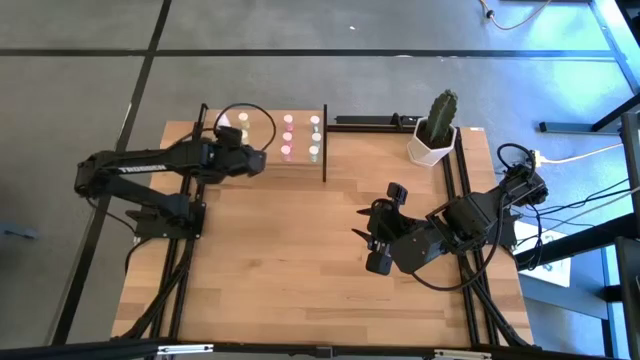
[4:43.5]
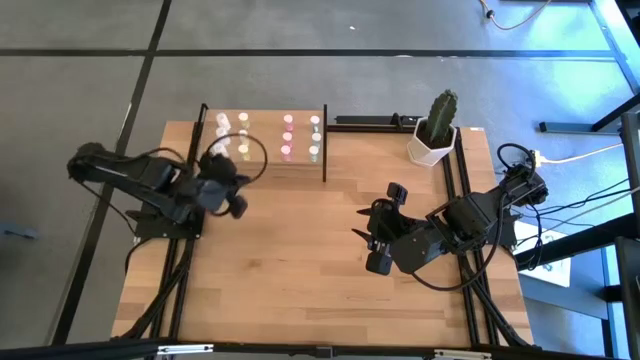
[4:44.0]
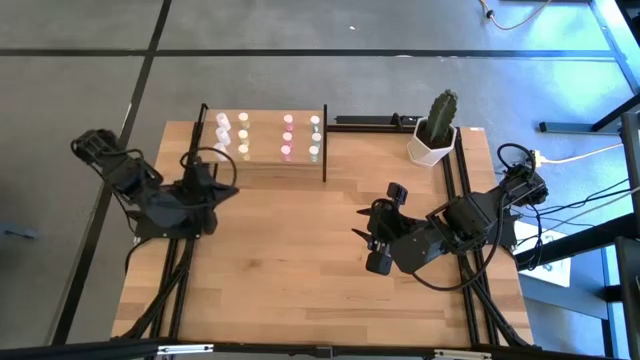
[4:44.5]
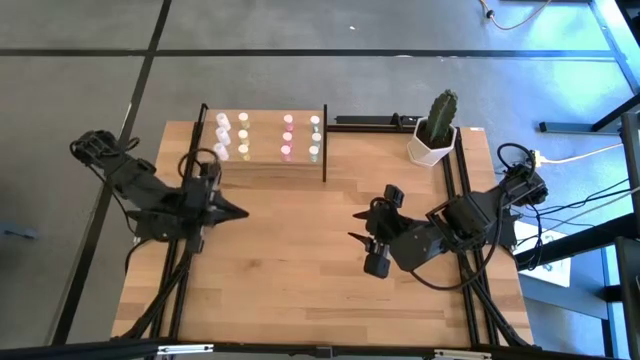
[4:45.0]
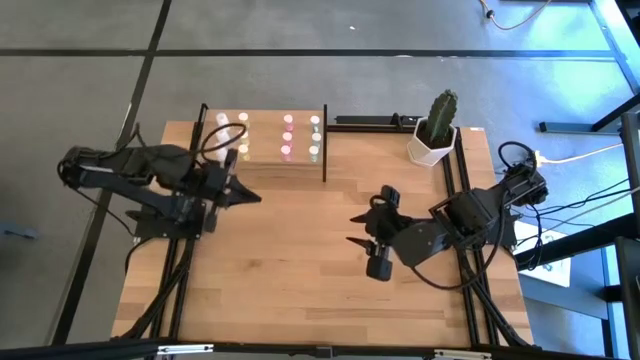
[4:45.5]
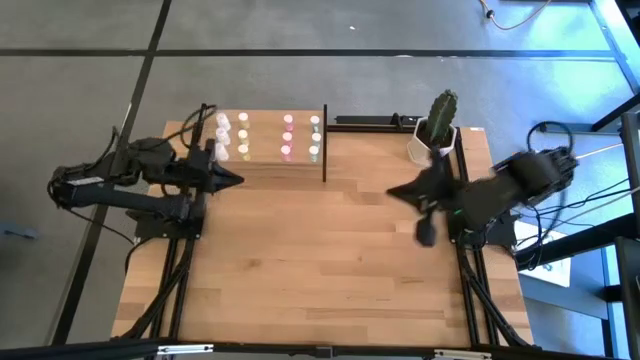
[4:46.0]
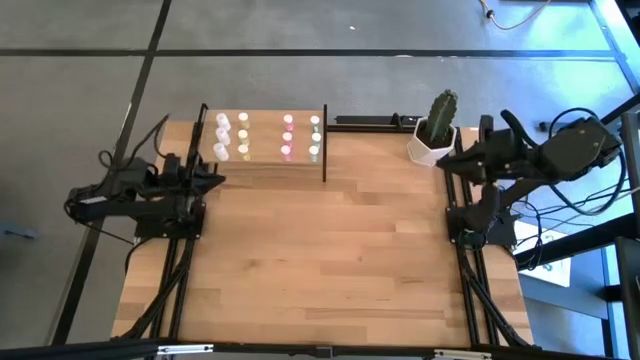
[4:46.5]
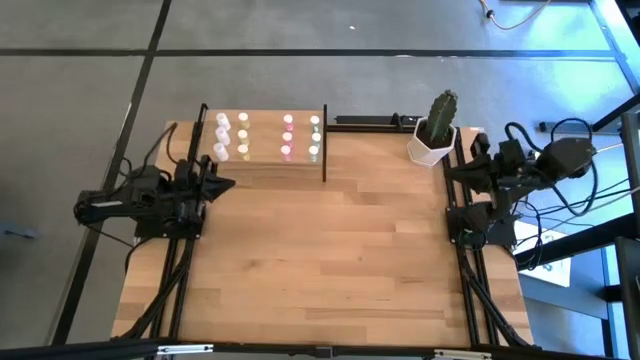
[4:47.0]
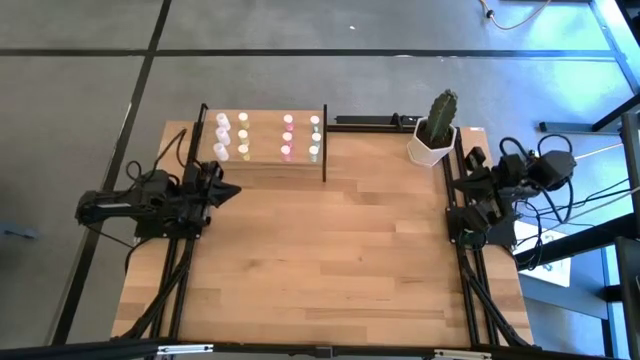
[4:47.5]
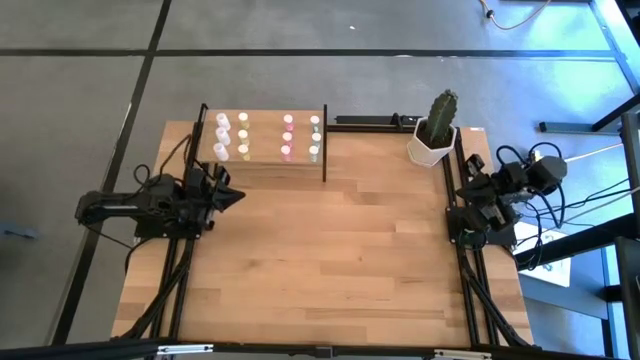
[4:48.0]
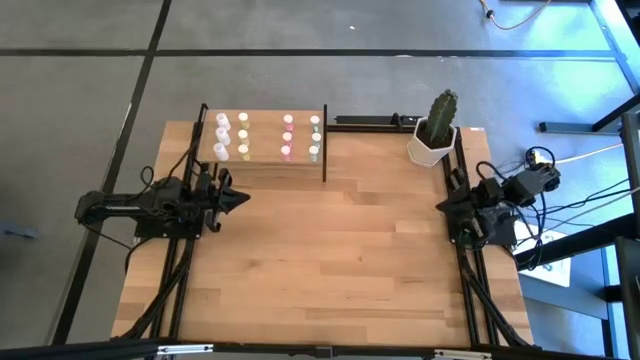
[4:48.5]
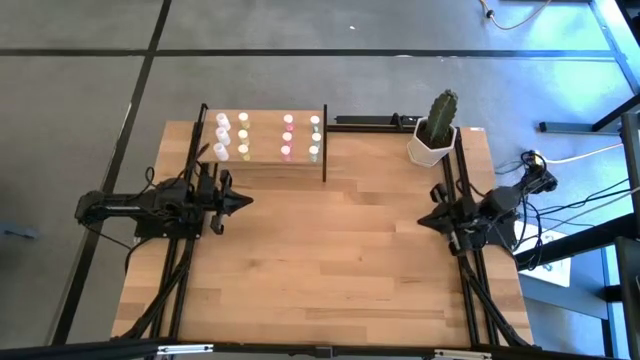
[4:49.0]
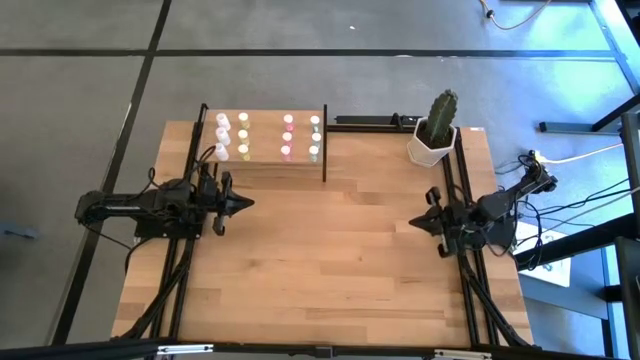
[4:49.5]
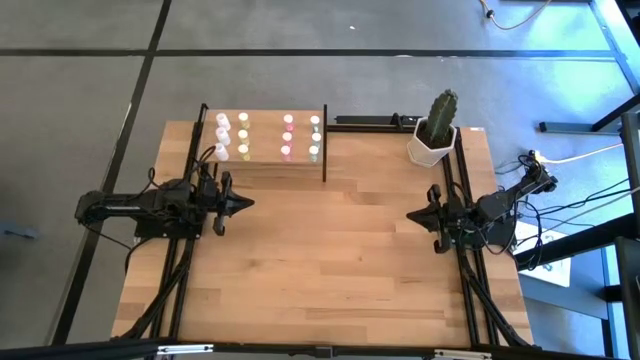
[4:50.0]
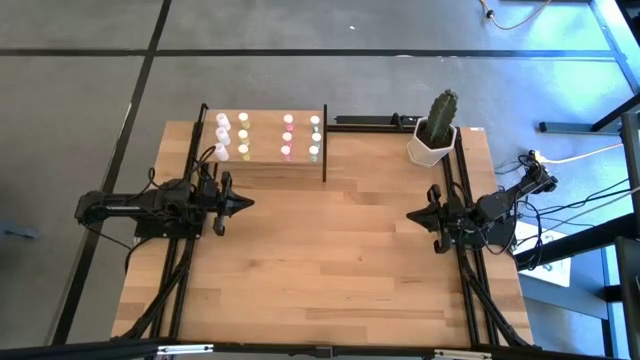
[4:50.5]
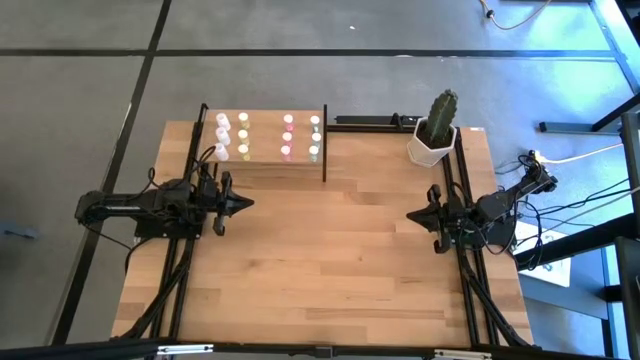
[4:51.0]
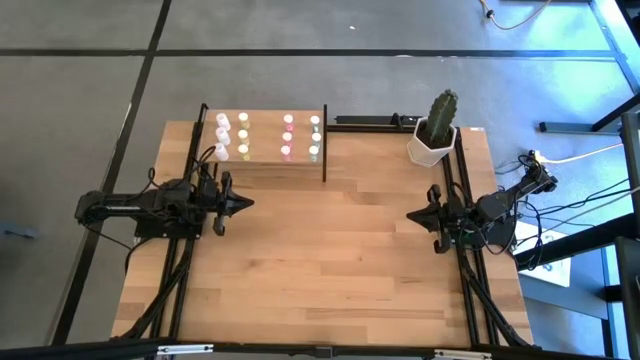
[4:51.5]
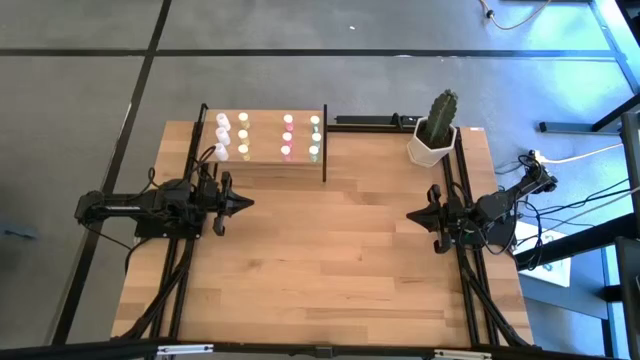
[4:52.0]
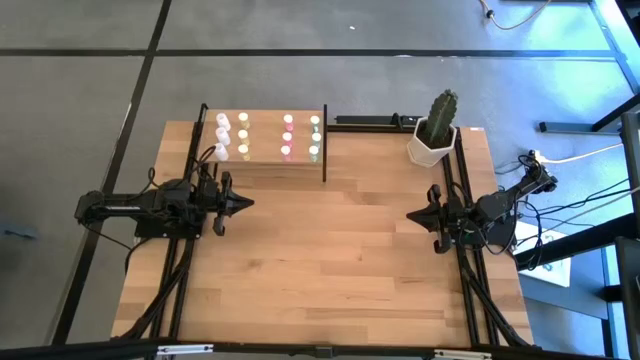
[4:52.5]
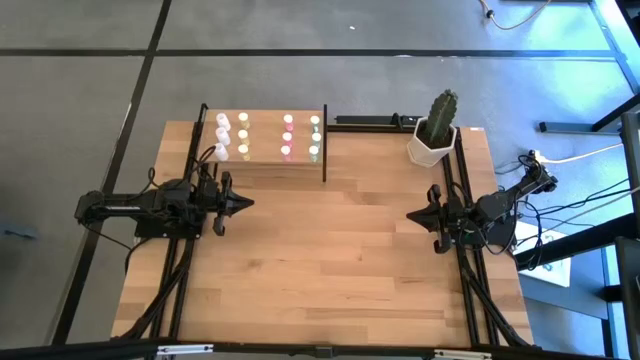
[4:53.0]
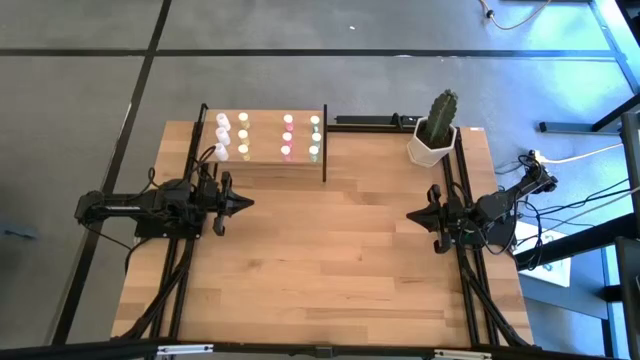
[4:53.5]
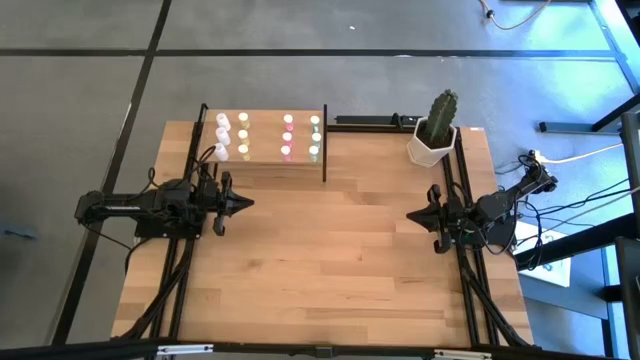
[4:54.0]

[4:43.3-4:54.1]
Task: Pick and place medicine bottles onto shelf by color
Return to Home Position

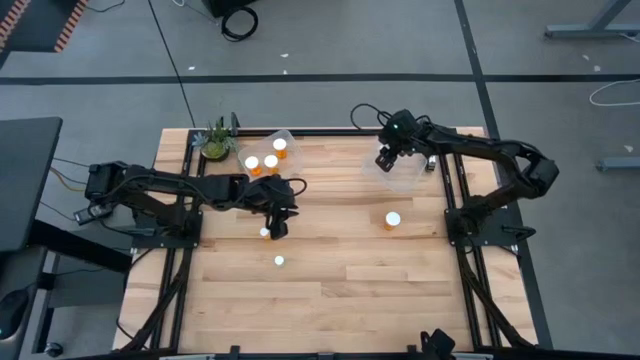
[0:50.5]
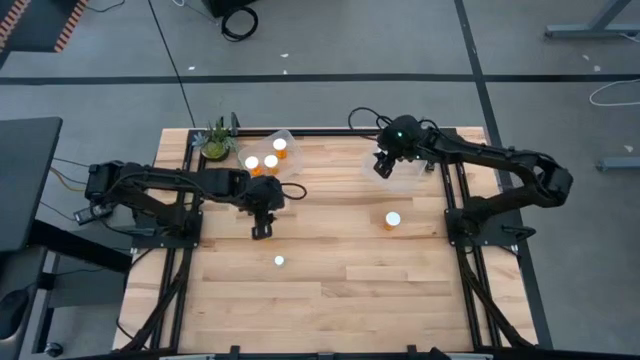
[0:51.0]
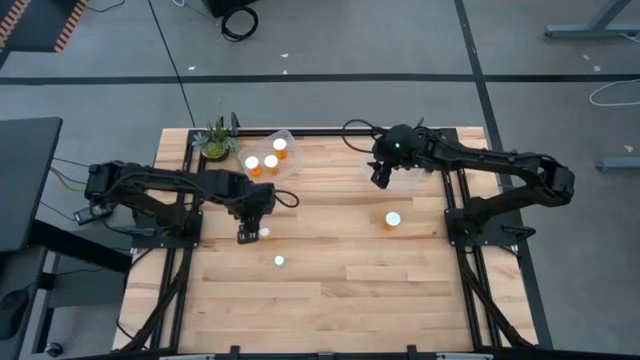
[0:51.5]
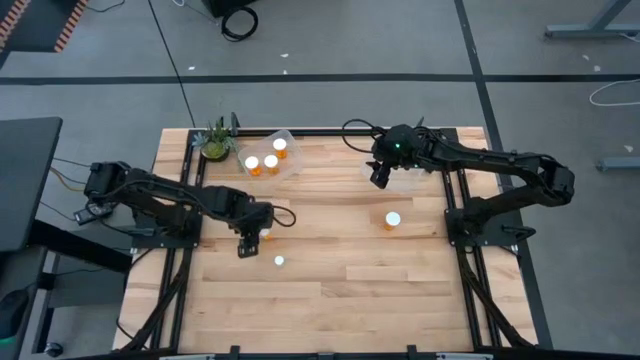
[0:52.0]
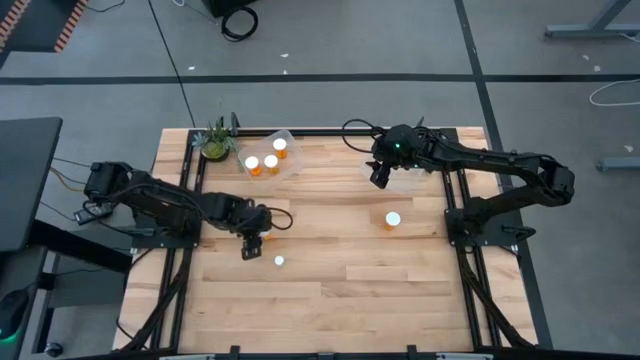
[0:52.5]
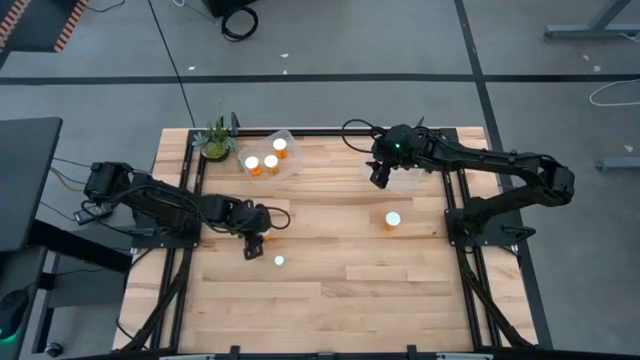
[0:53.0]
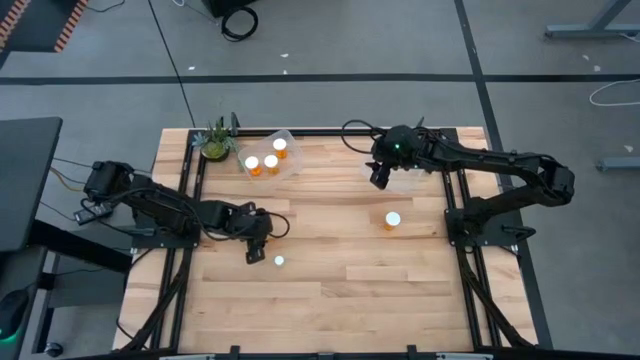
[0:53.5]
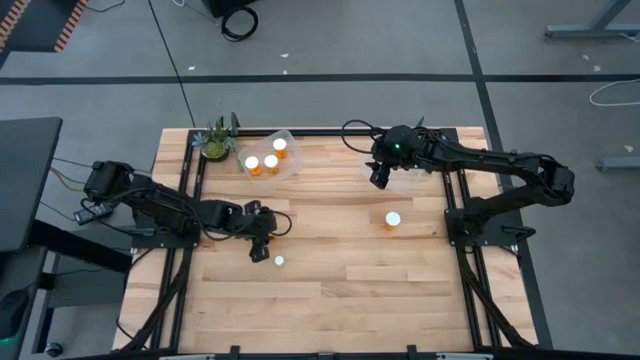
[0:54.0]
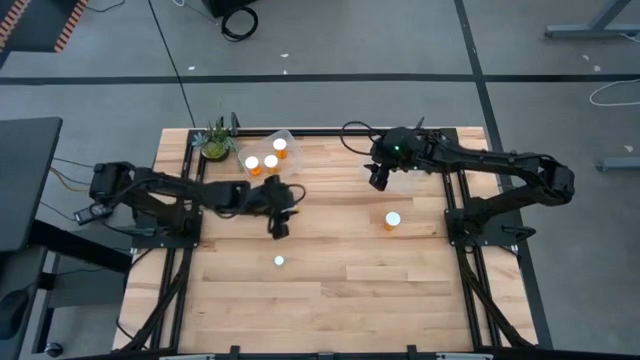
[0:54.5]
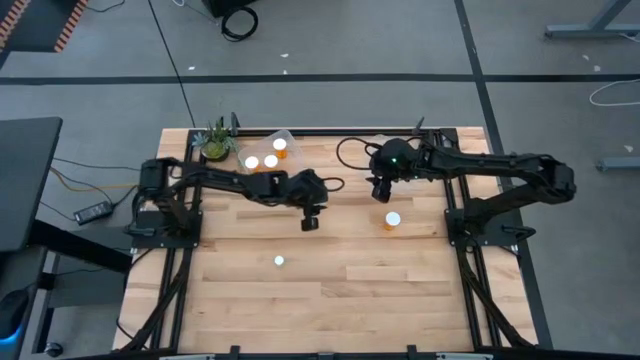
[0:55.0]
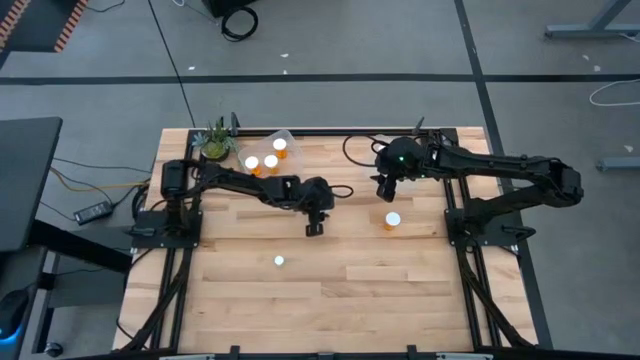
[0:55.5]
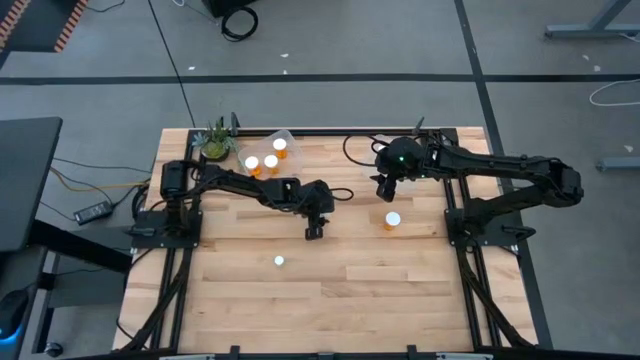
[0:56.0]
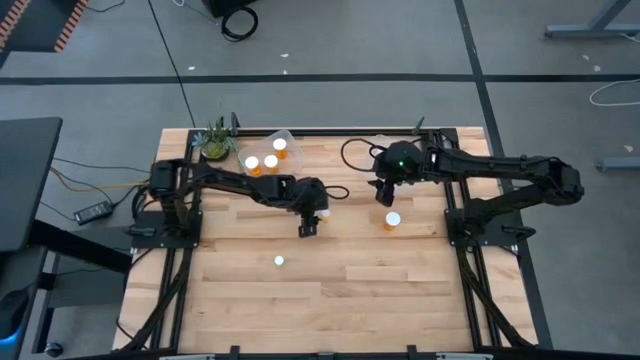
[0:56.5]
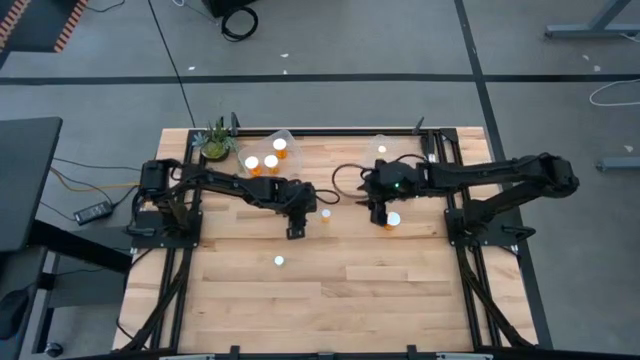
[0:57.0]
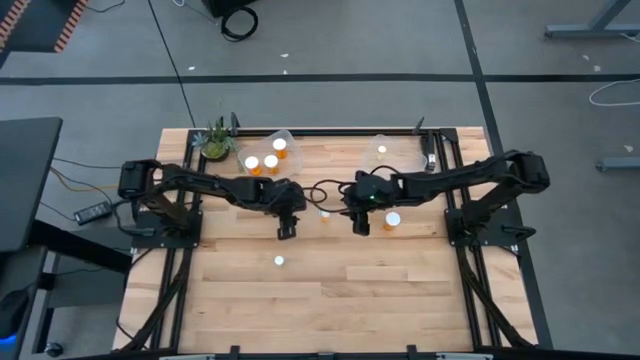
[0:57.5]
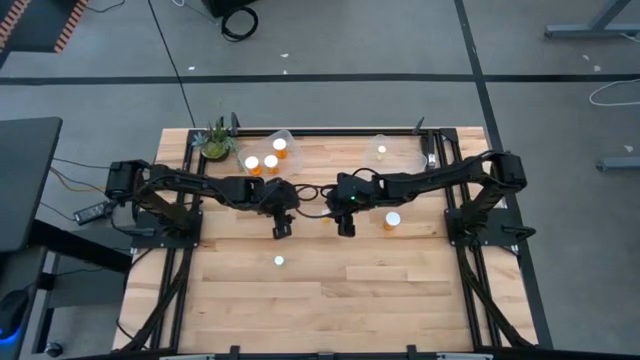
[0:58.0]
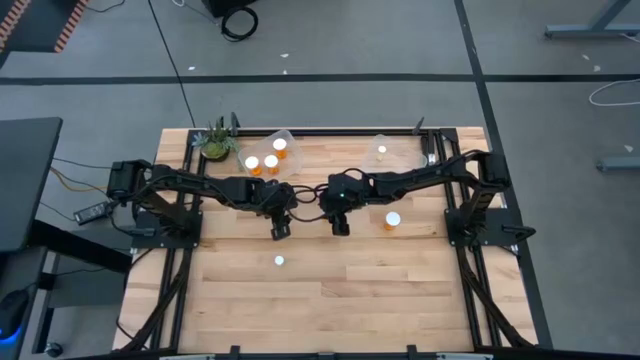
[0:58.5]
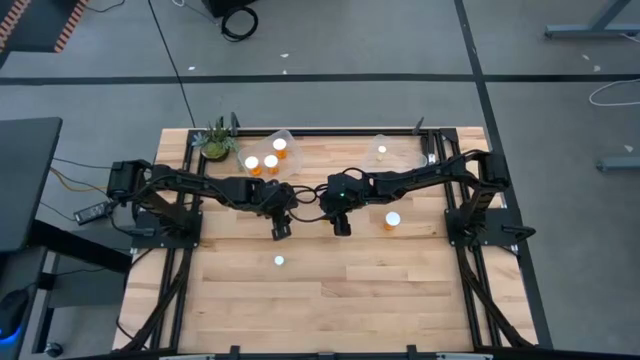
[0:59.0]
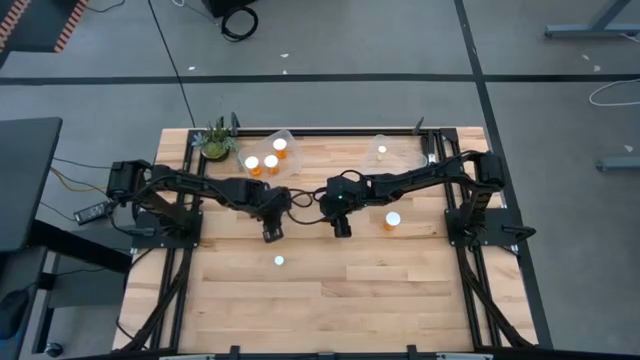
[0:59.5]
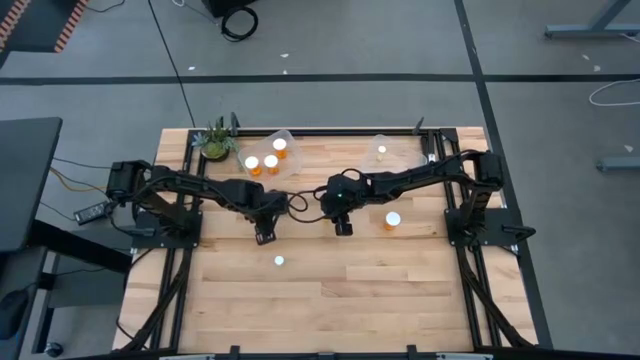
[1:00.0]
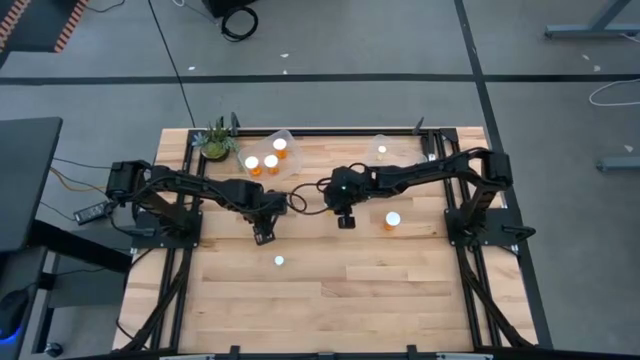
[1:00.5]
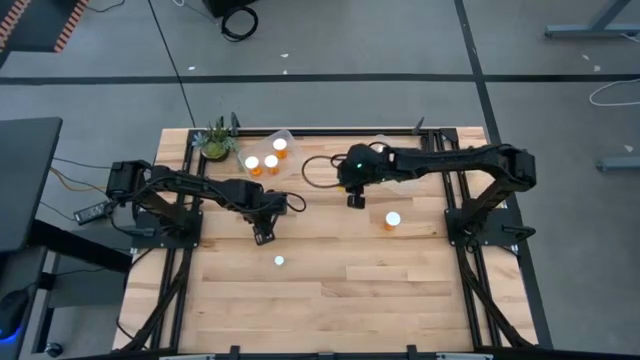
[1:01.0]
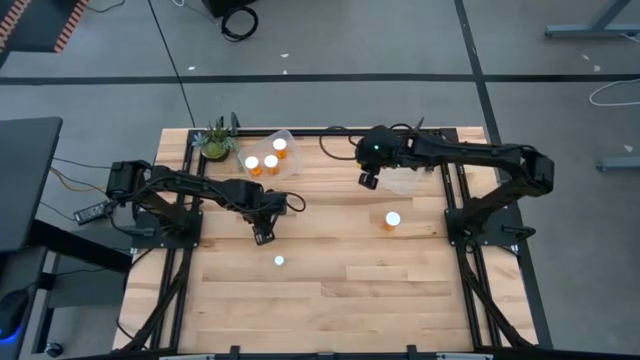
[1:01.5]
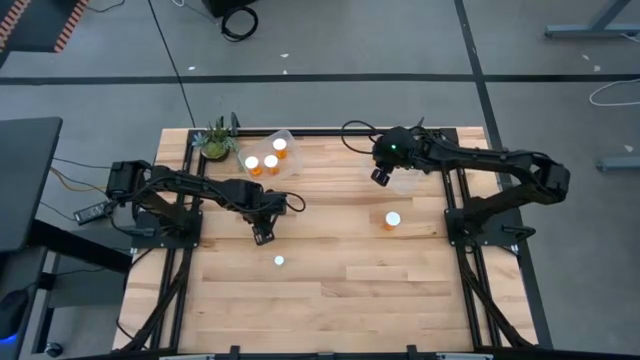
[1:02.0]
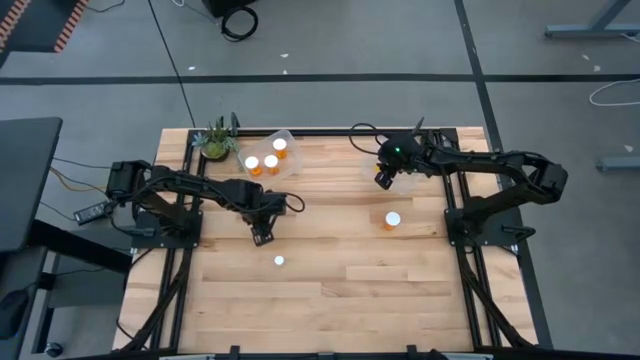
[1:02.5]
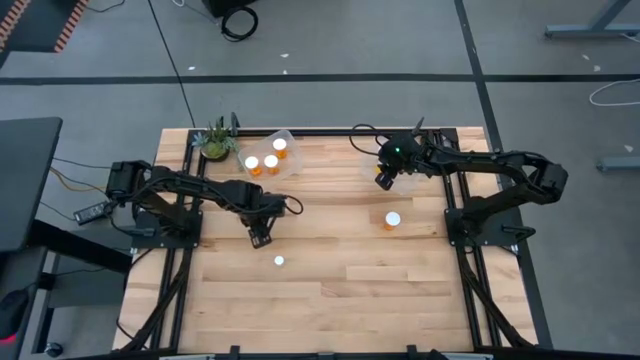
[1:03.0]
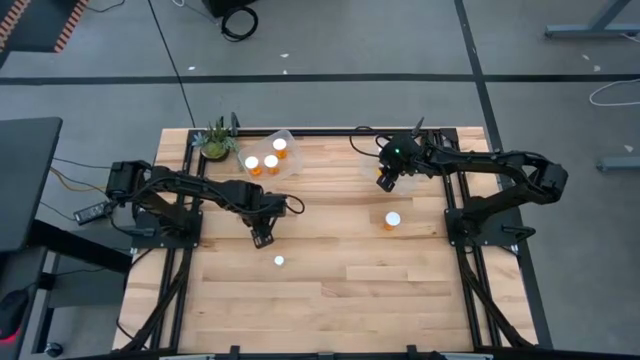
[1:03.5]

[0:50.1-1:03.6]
Task: Pick and place medicine bottles into bin by pill shape (circle, oval)
Put the orange tablet bottle into the right transparent bin
